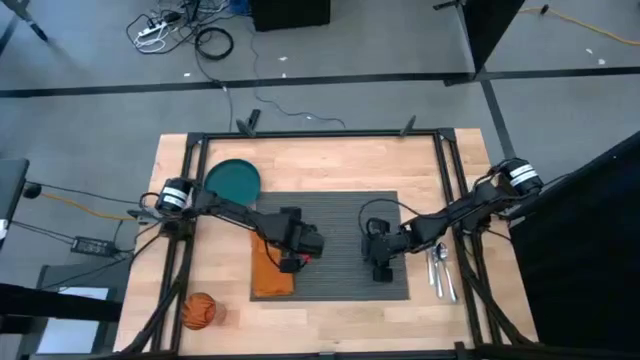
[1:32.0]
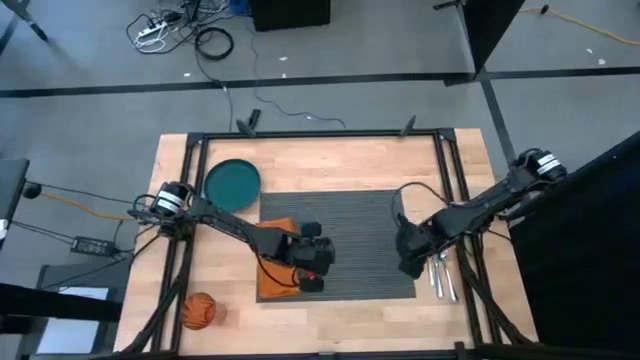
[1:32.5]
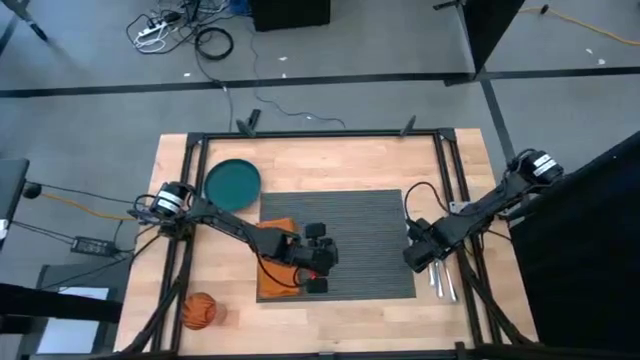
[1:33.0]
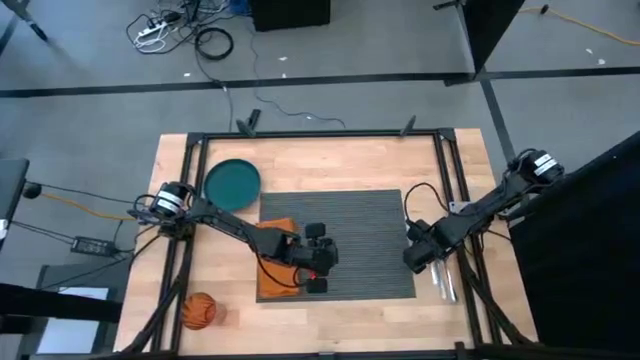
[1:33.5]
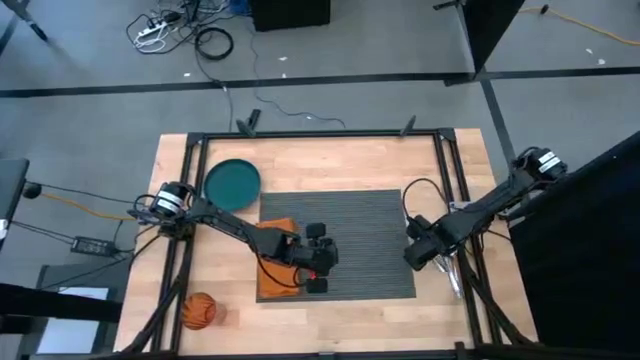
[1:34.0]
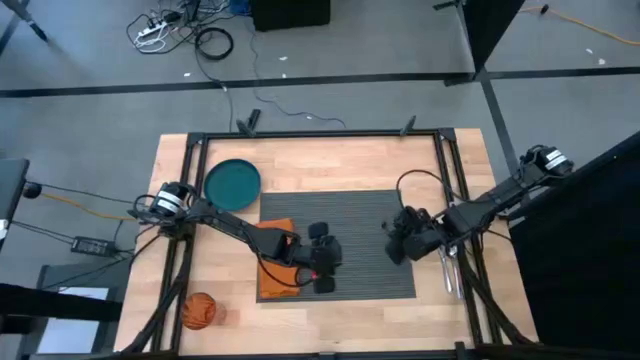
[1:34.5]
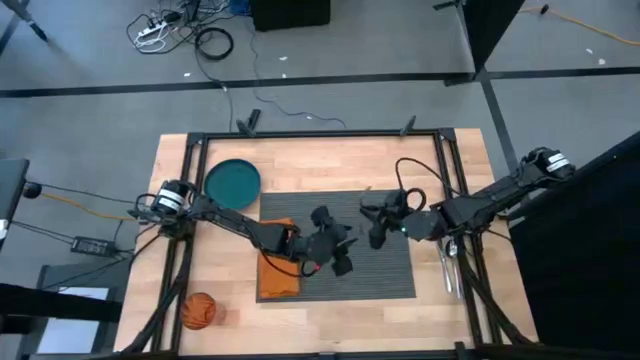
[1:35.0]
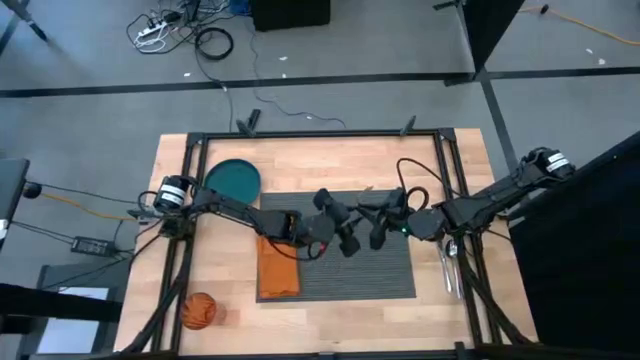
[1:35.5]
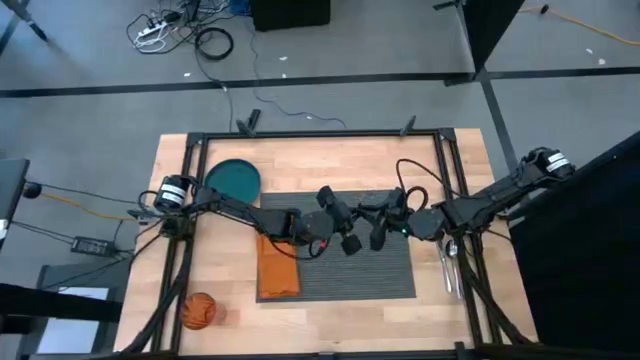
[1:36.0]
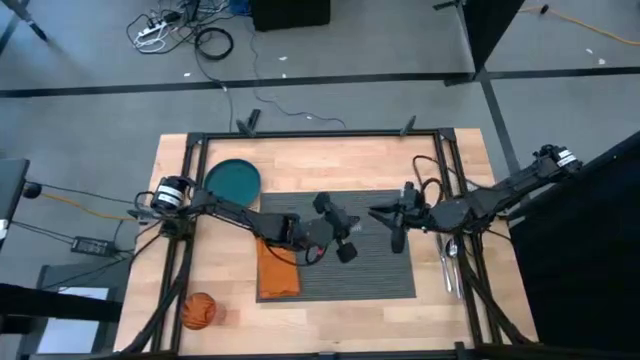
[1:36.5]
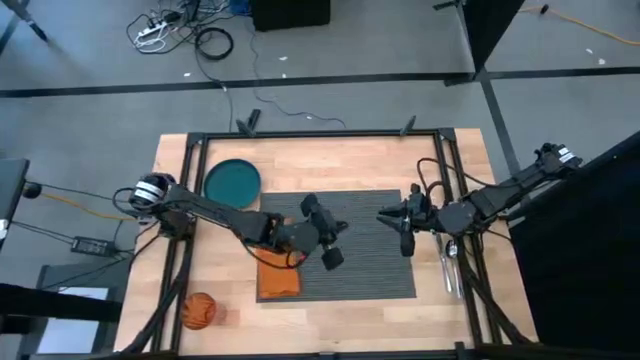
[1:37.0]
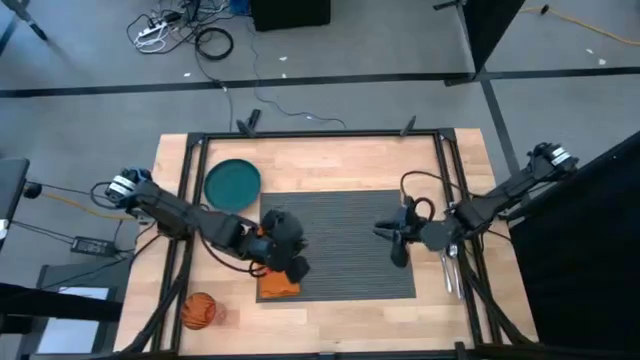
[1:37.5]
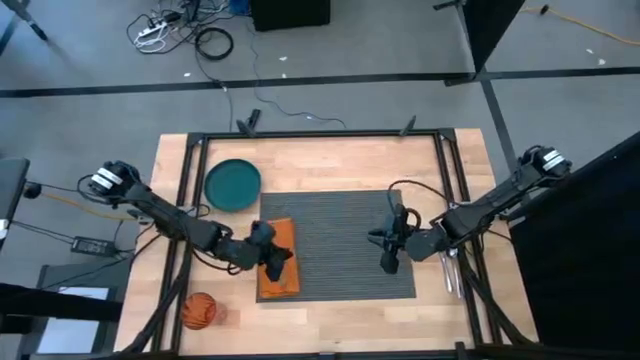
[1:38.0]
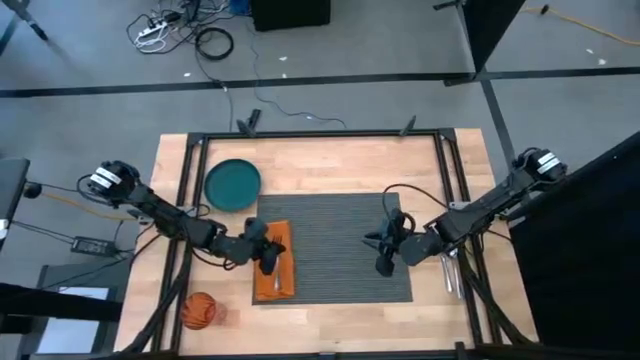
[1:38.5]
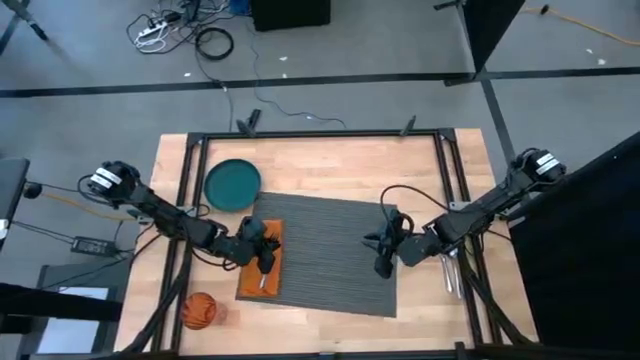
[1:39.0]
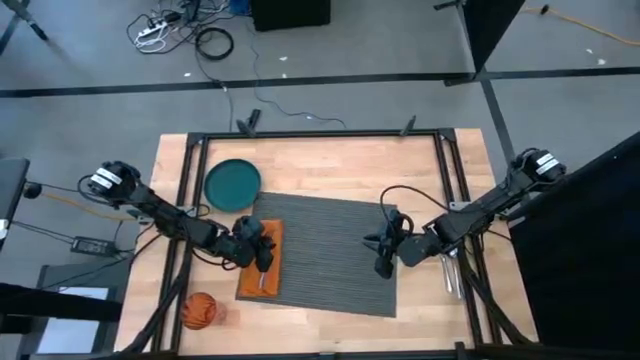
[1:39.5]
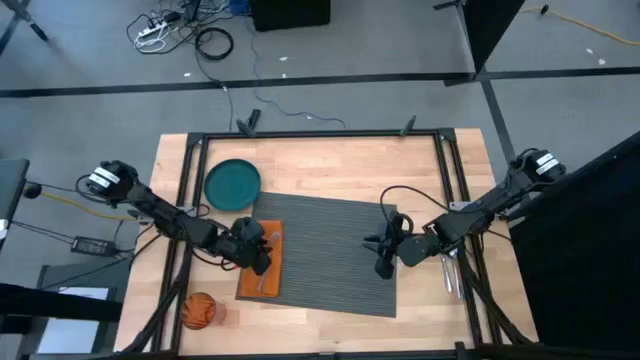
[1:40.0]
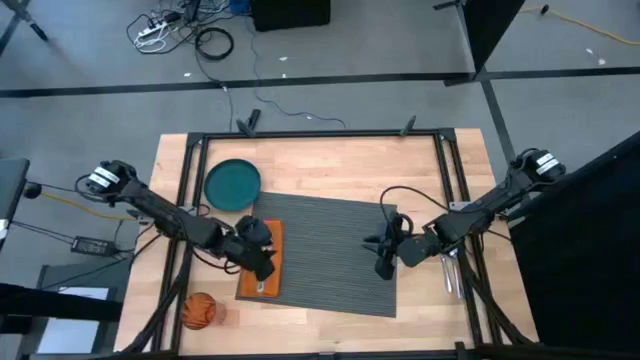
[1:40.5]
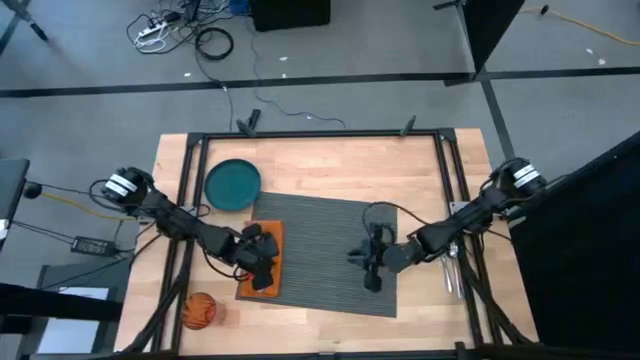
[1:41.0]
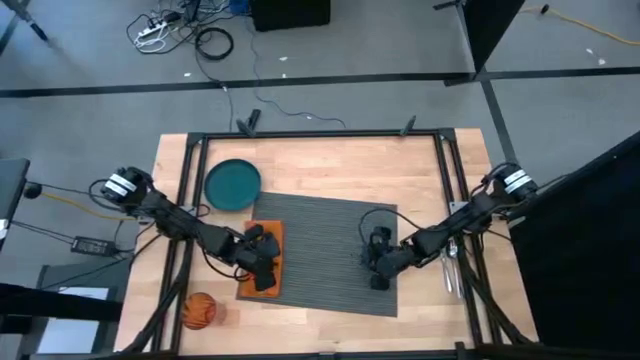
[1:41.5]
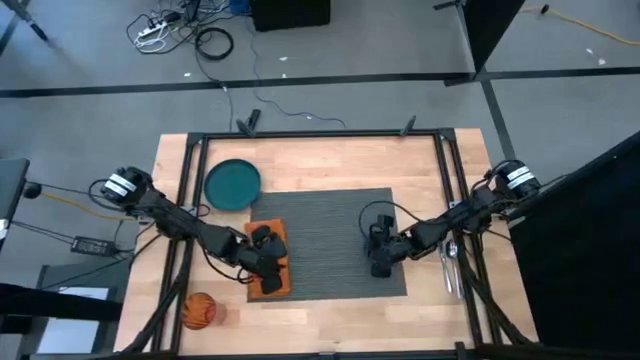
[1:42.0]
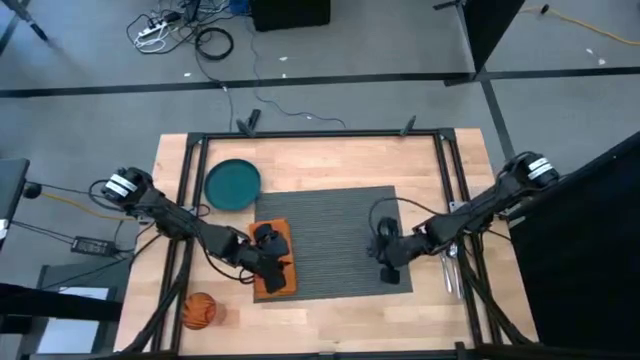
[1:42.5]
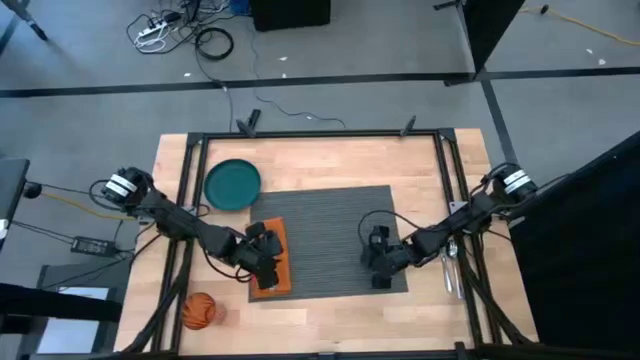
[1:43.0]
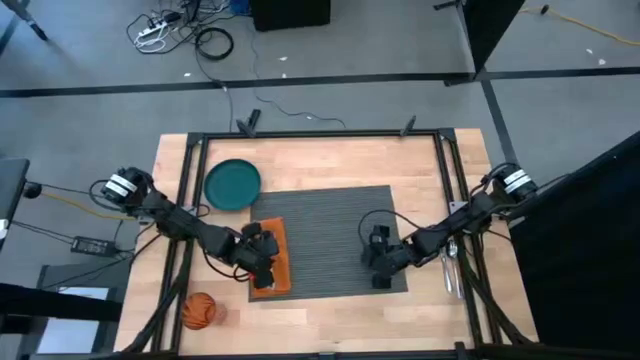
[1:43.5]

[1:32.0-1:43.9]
Task: Set table place
Put the silver fork on orange table napkin

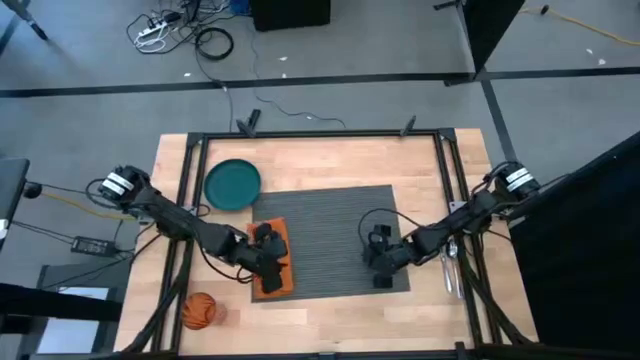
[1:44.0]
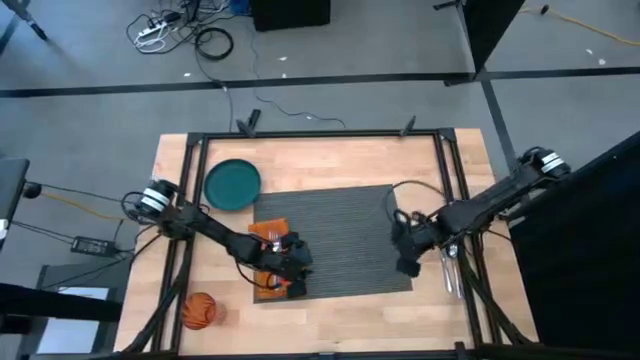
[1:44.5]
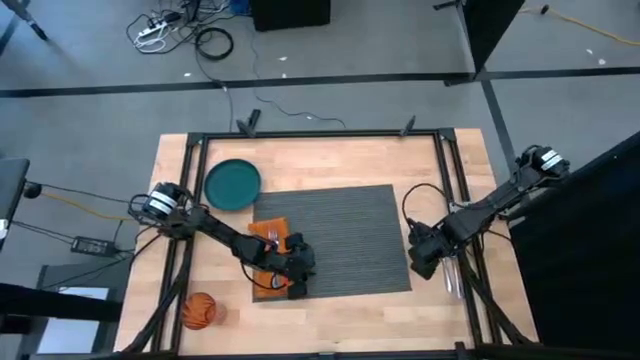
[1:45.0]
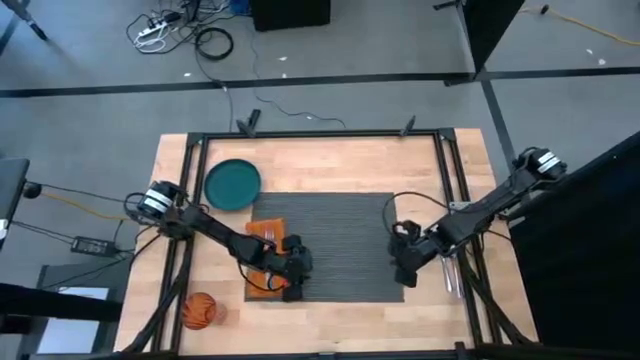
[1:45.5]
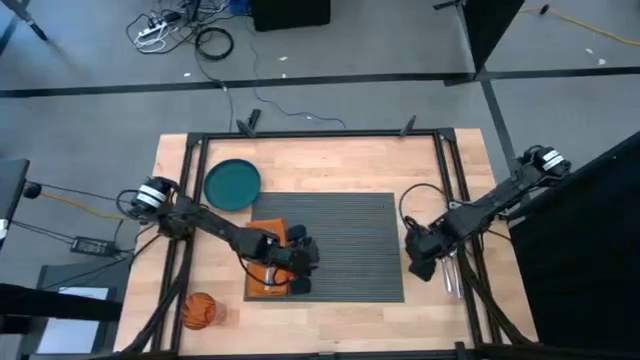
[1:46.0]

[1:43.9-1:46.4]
Adjust the gray placemat

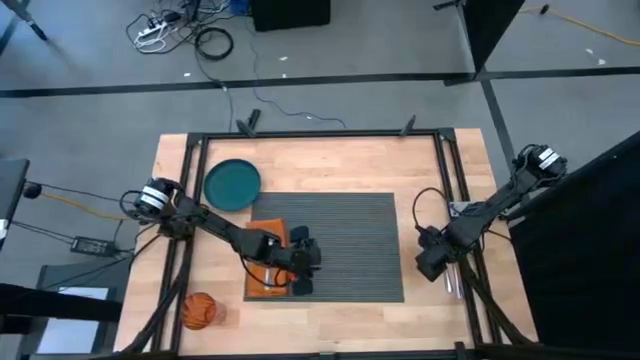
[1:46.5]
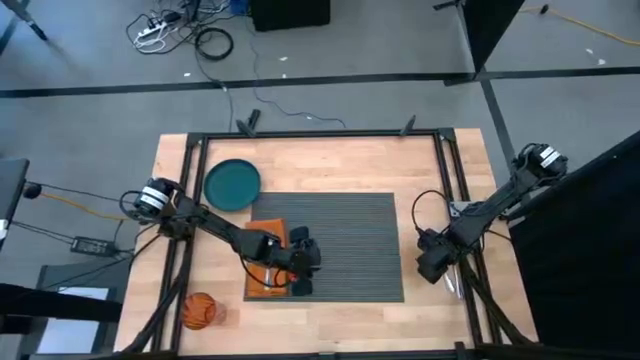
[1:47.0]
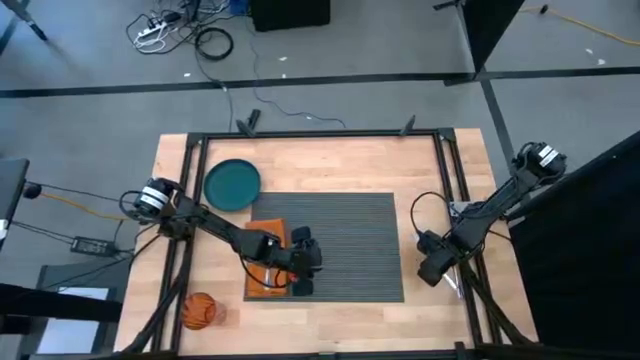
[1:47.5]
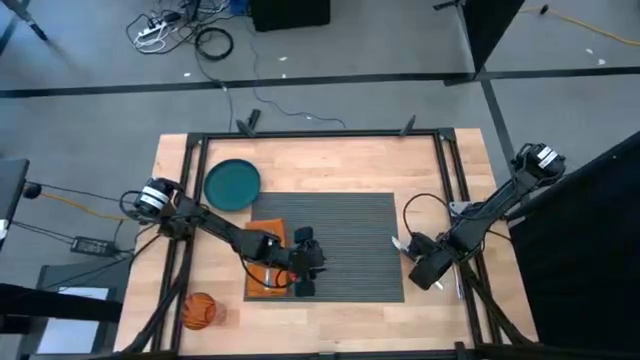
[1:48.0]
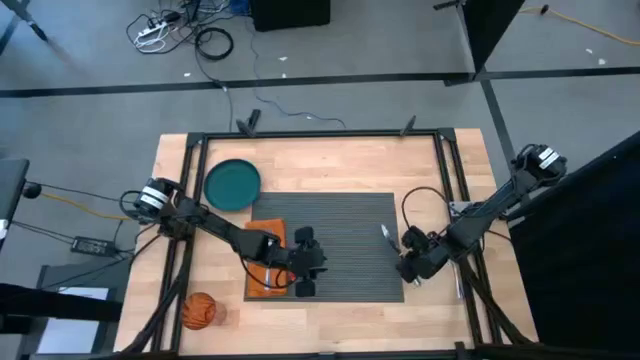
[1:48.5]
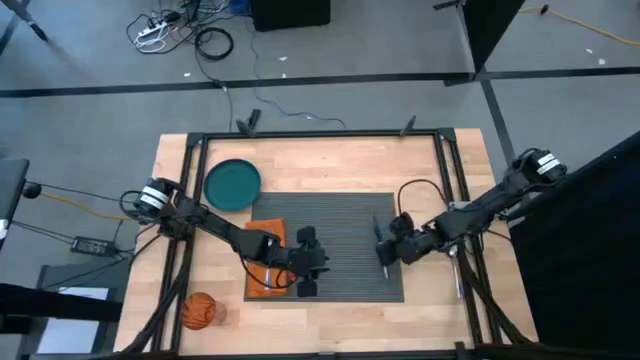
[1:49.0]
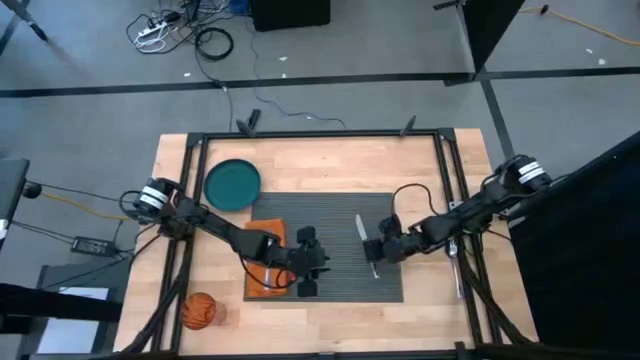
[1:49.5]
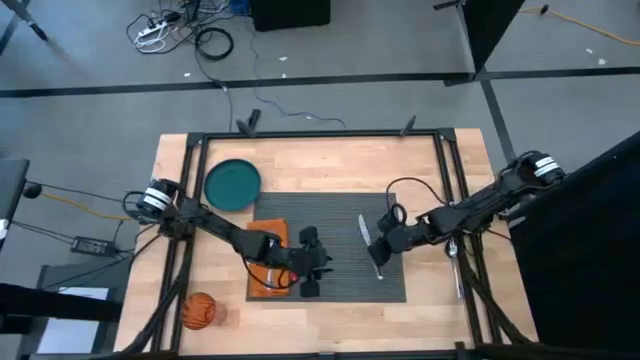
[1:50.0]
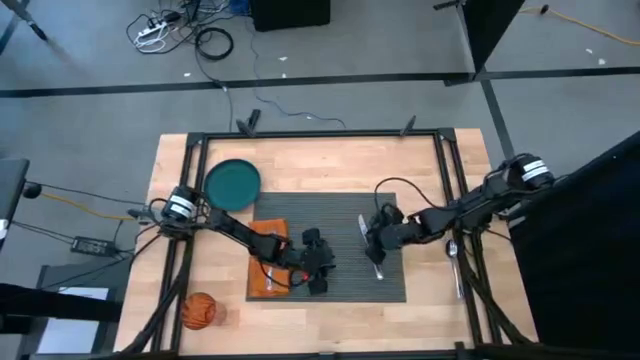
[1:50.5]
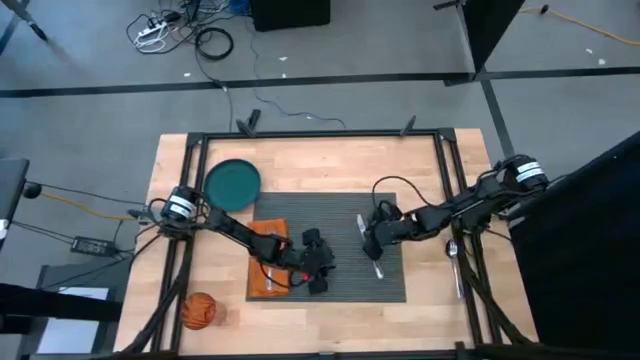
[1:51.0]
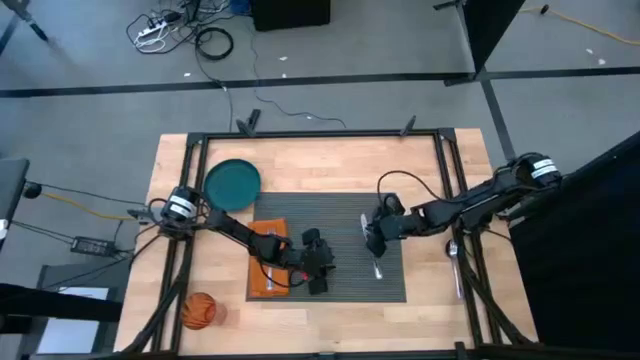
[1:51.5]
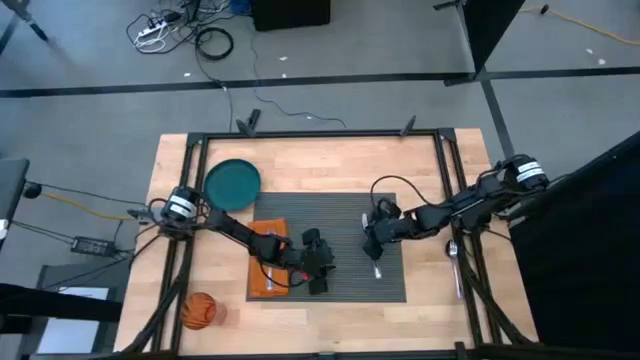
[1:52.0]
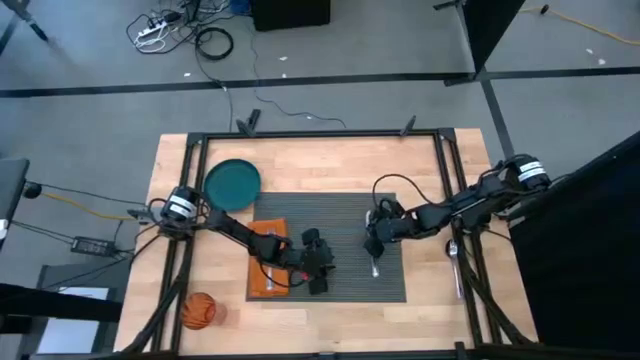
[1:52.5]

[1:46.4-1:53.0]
Put the silver knife on the gray placemat

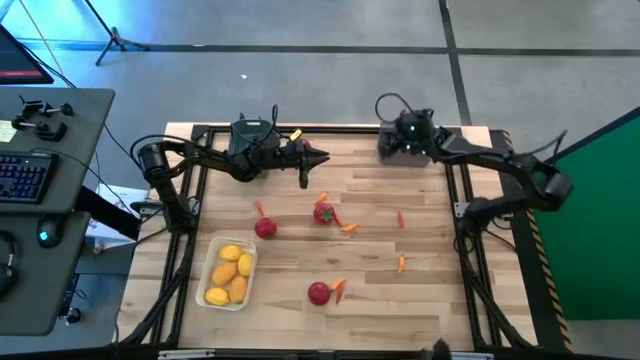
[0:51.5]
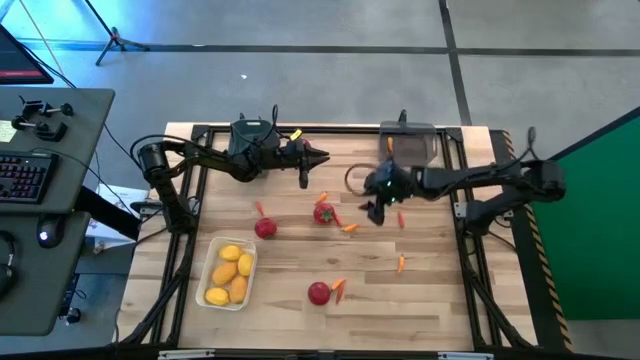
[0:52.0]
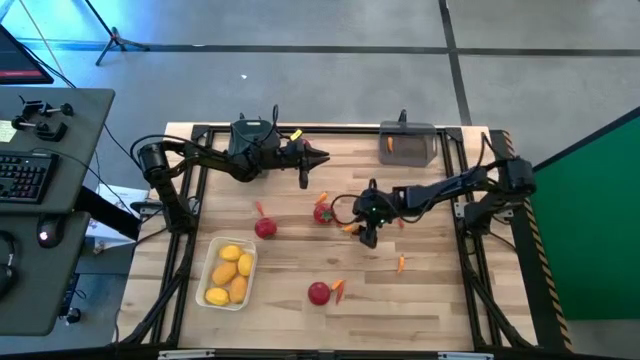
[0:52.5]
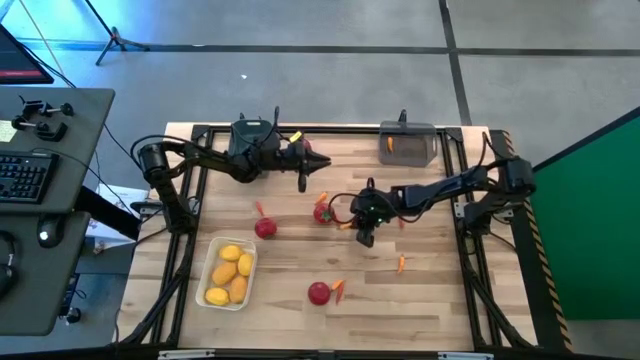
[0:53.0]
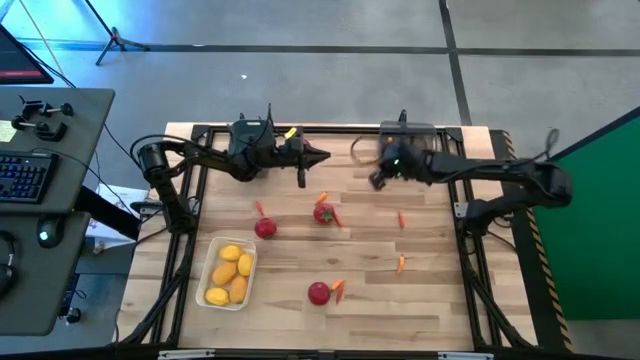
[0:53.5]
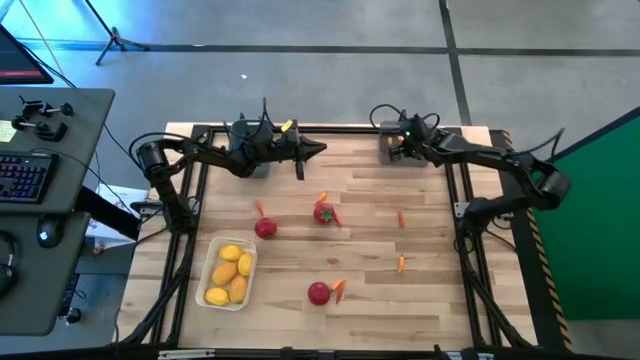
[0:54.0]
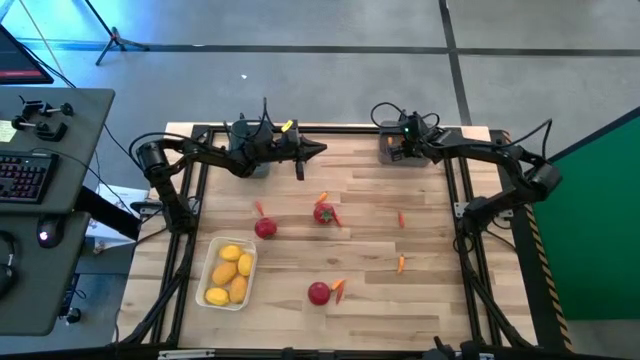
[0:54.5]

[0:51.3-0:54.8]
Task: Sort produce into baskets
Put the orange chili pepper into the black bin
